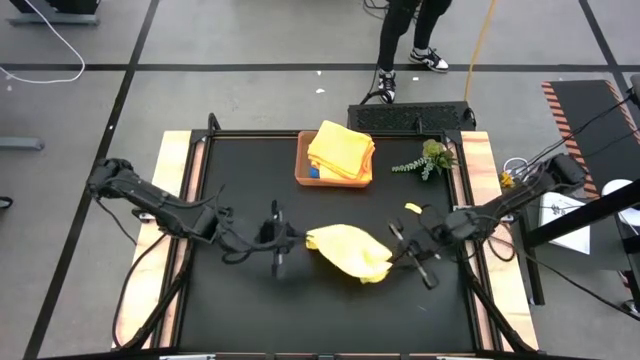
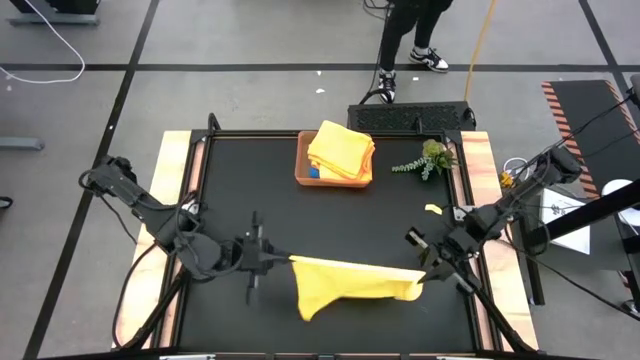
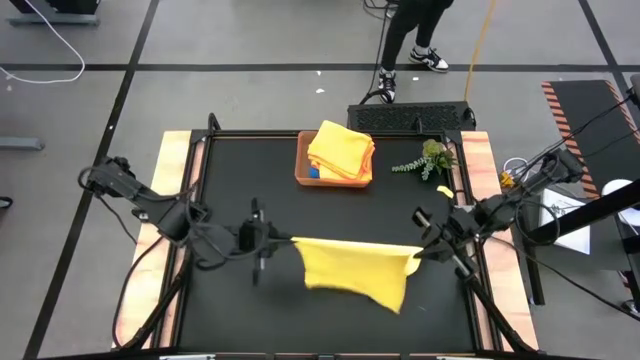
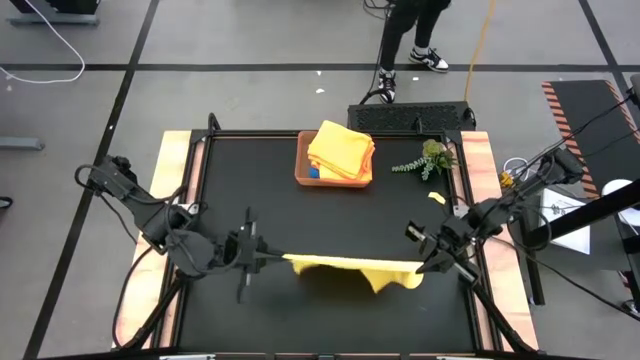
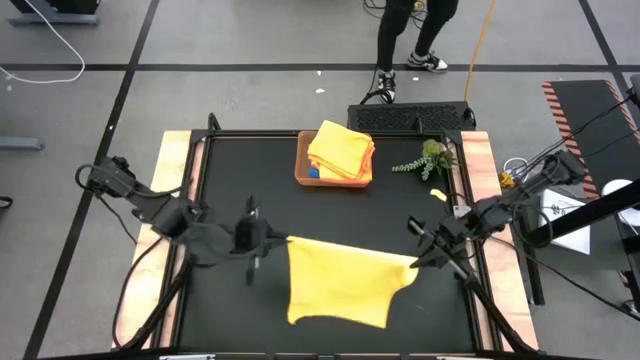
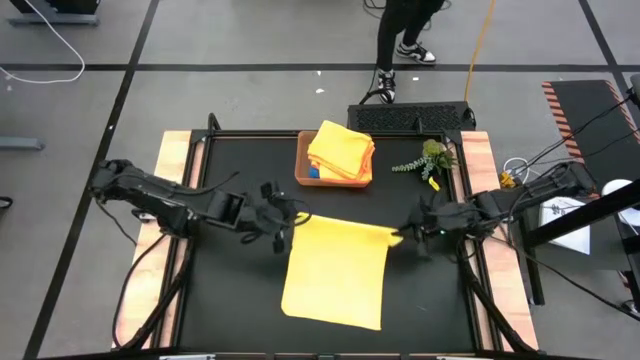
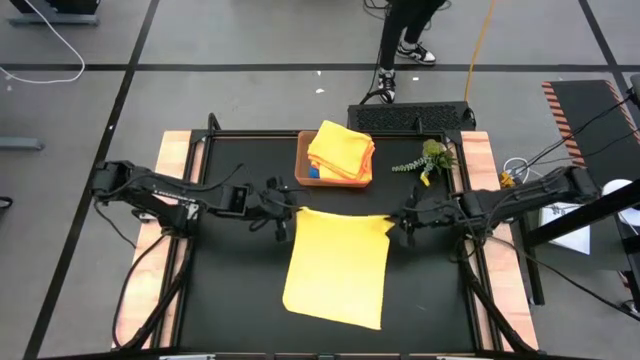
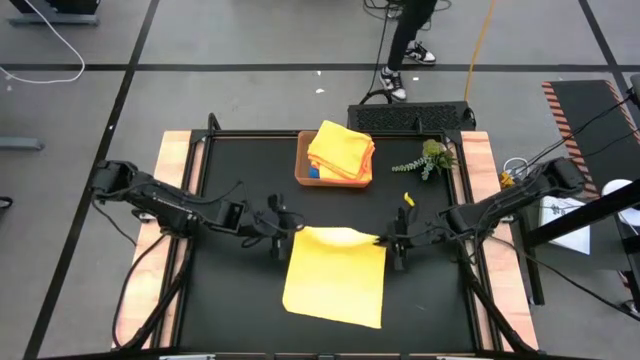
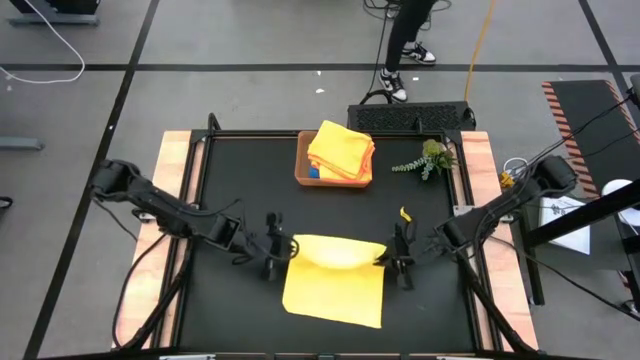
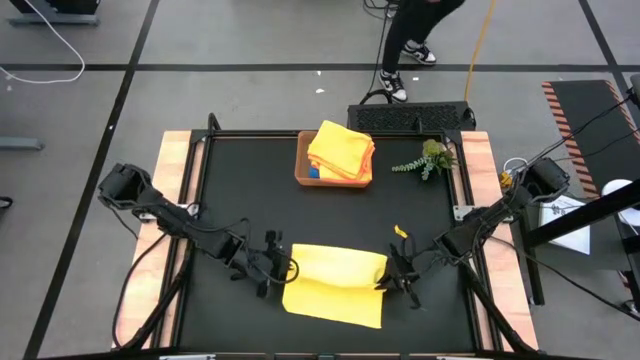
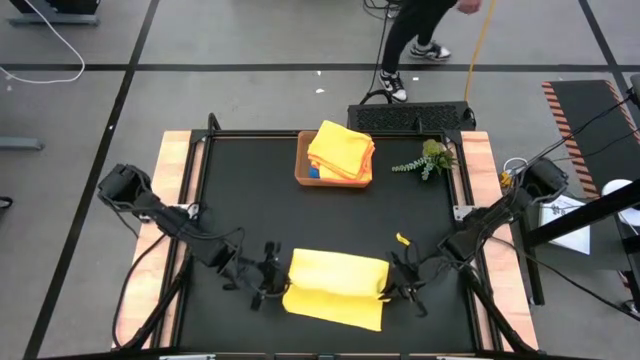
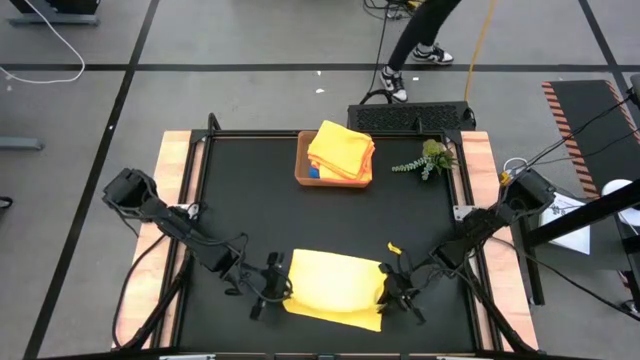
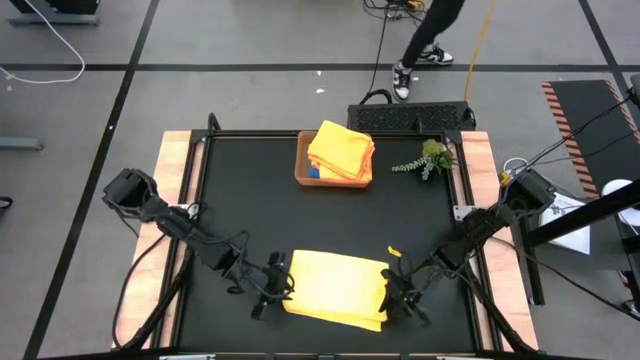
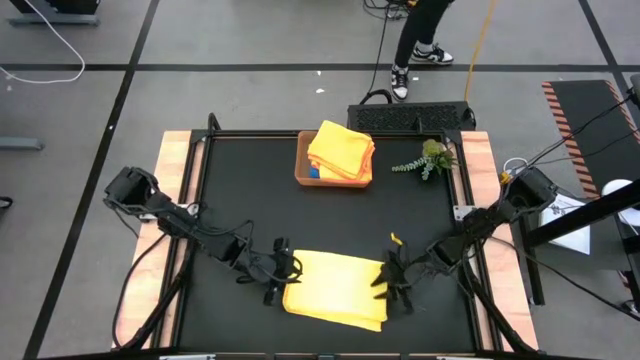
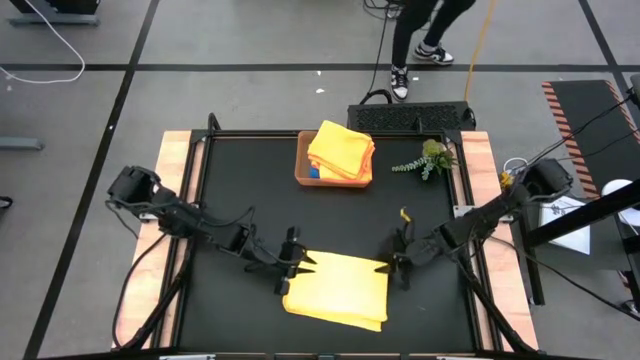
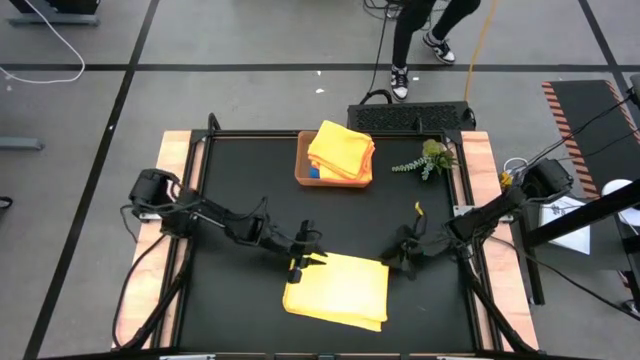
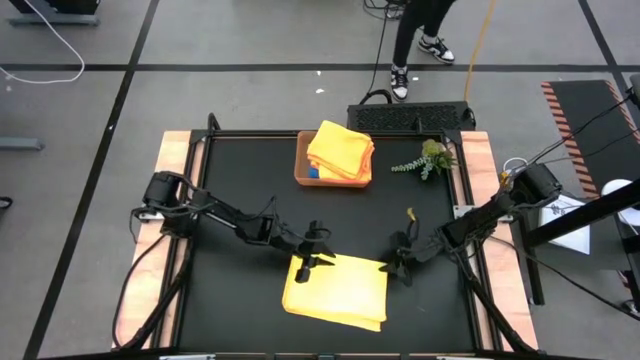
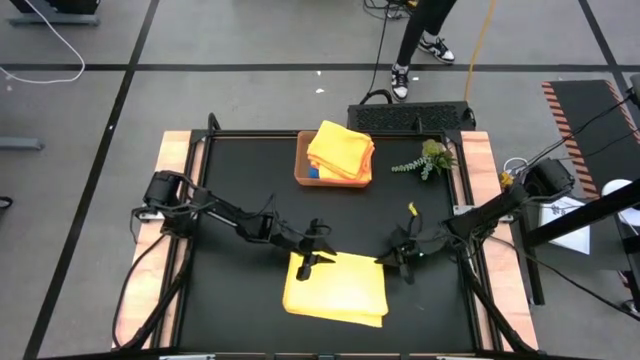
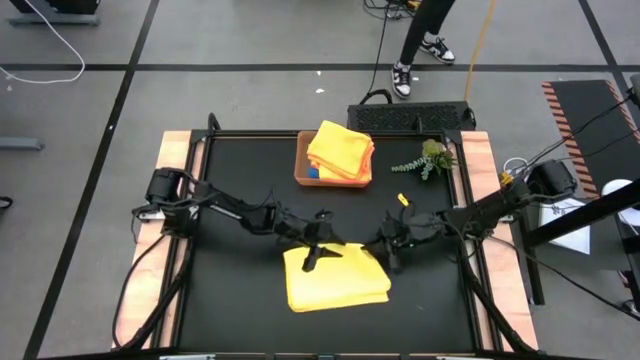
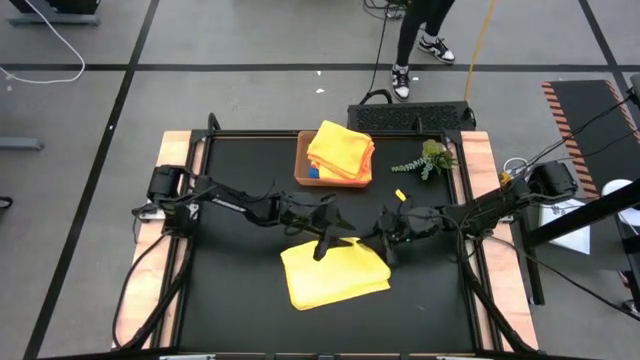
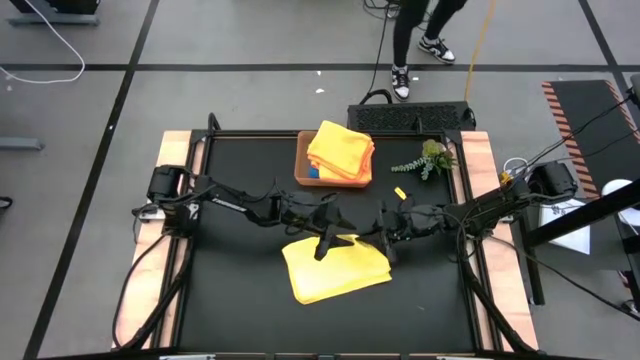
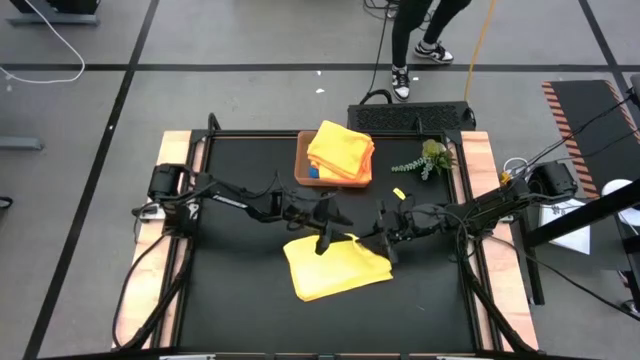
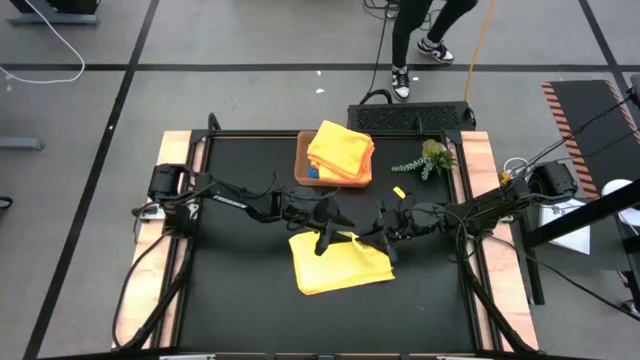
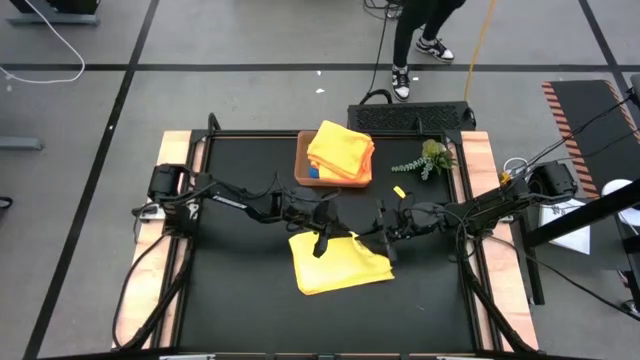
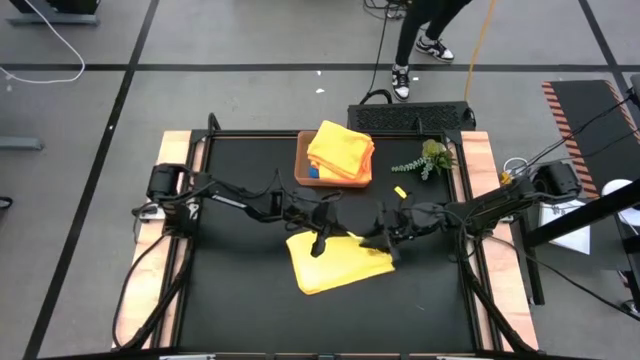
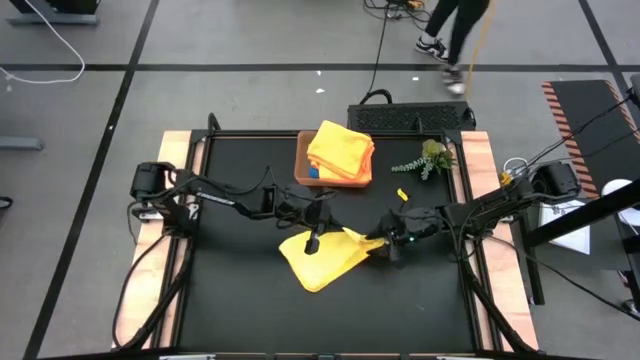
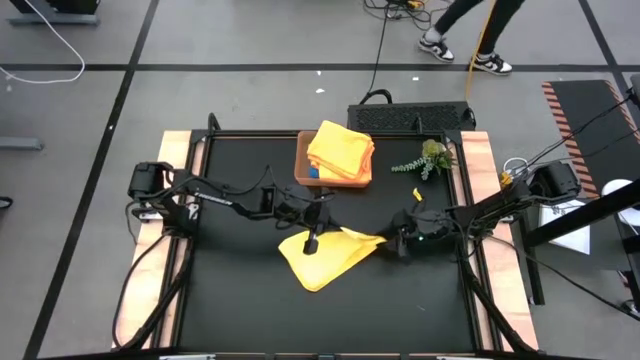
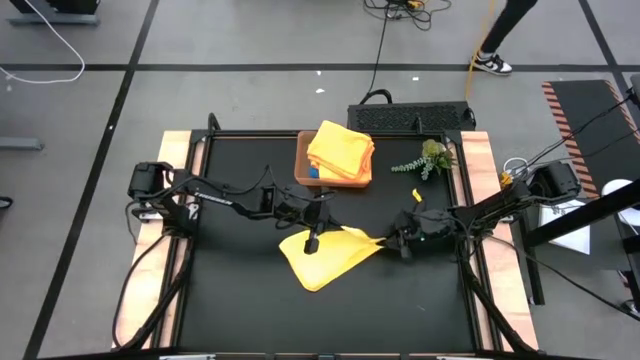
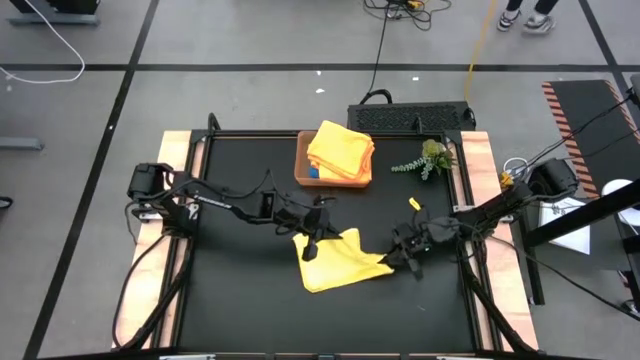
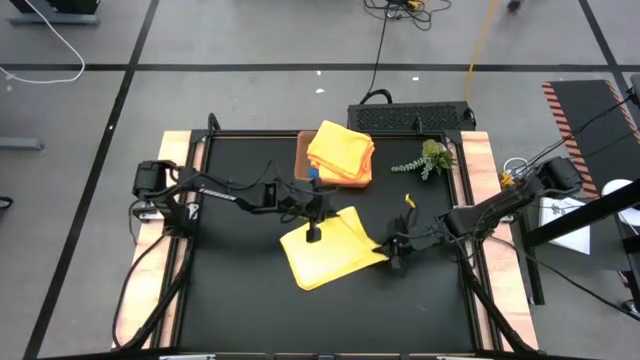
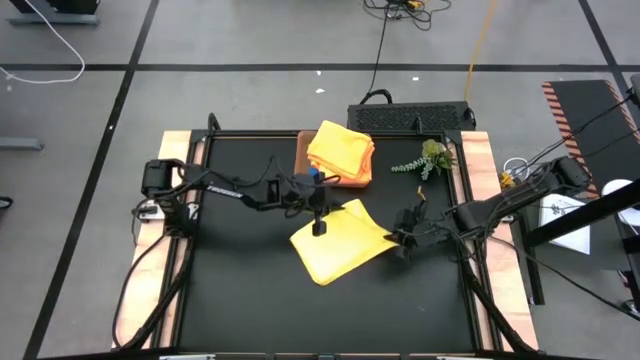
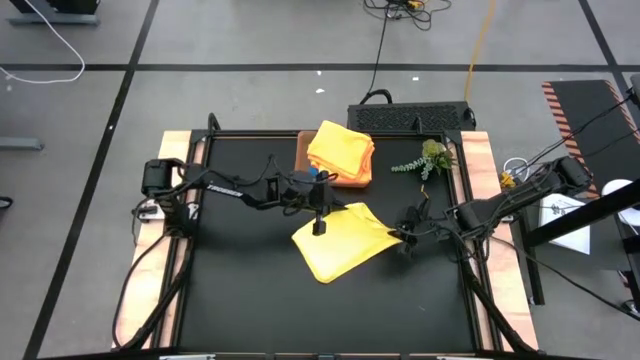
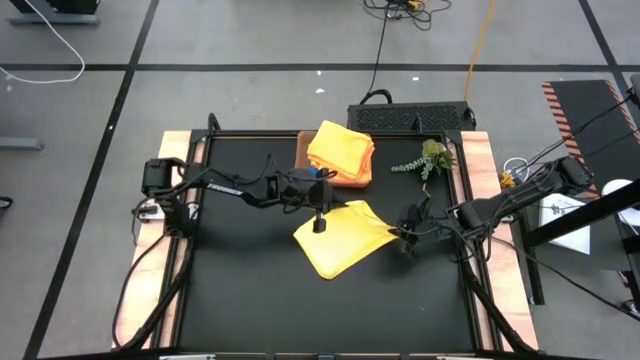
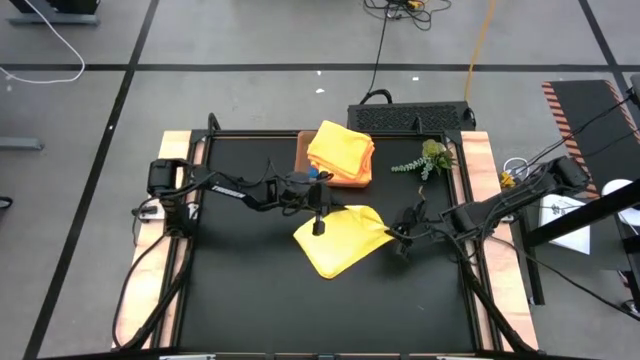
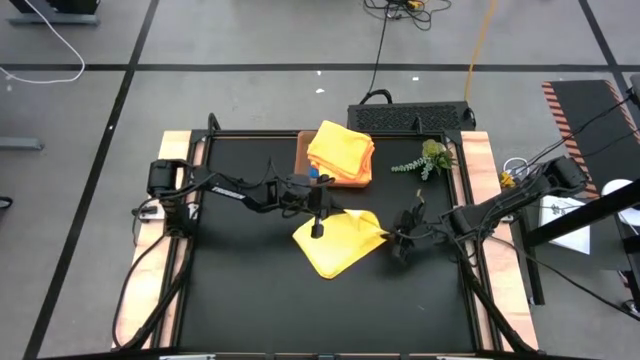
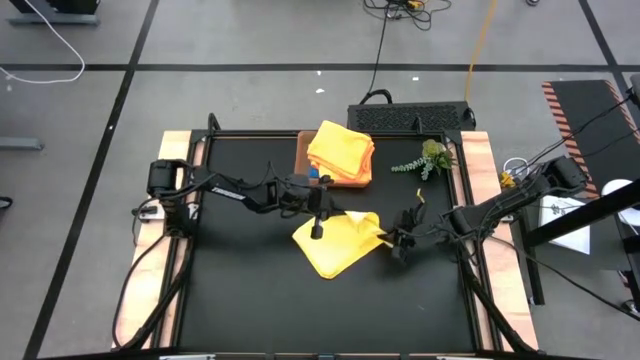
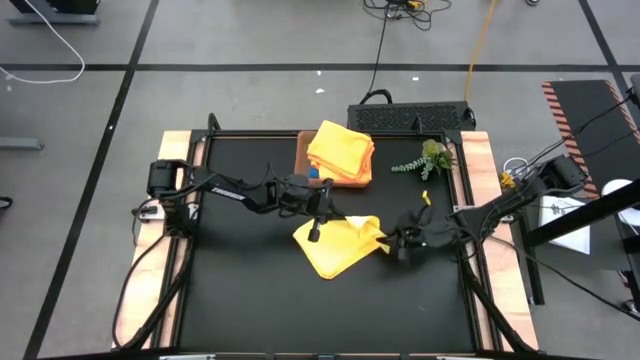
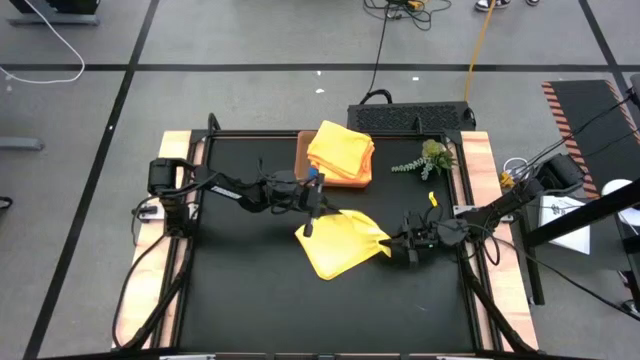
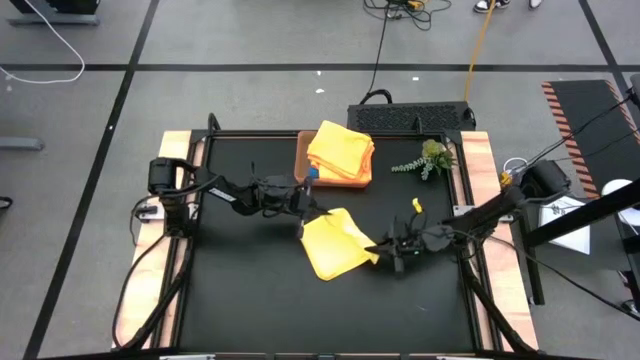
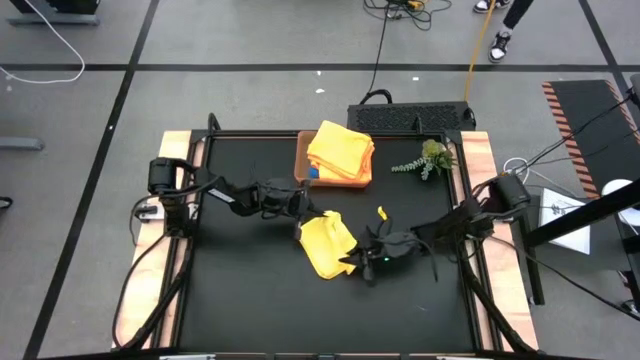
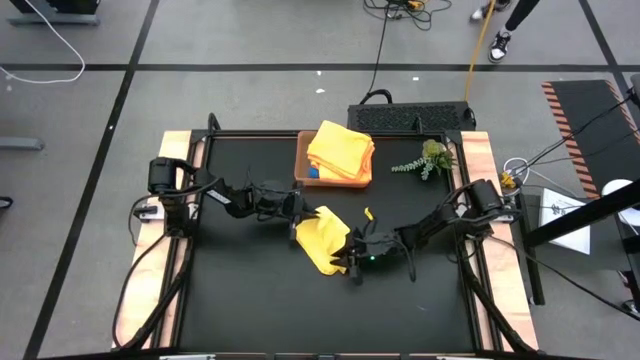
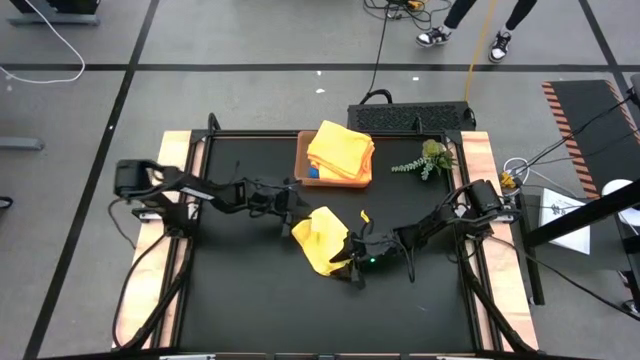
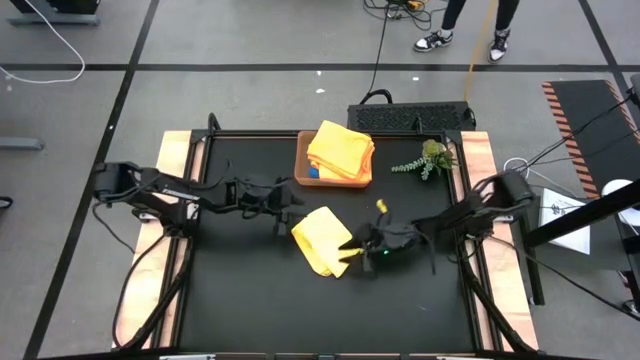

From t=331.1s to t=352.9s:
Task: Fold microfiber towels
Fold the yellow microfiber towel
